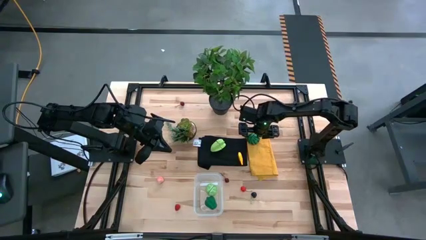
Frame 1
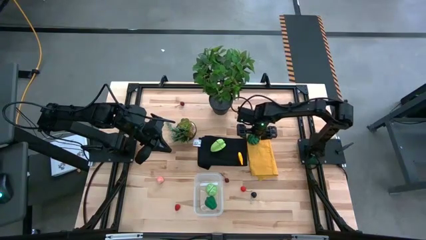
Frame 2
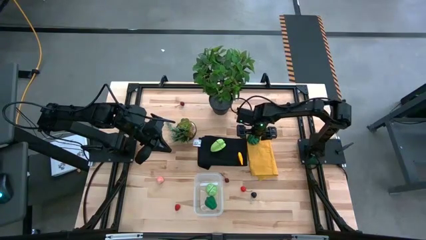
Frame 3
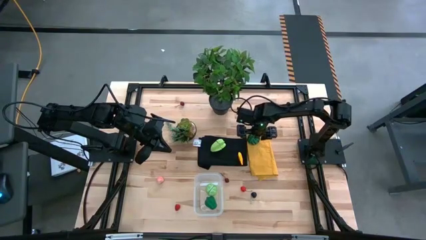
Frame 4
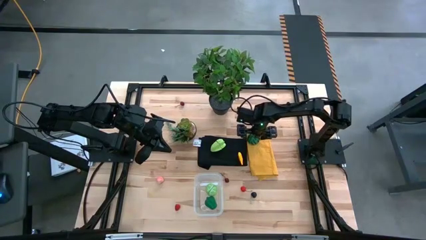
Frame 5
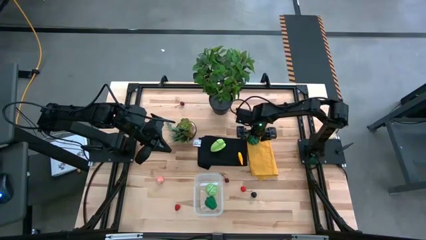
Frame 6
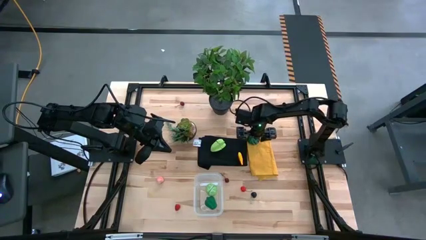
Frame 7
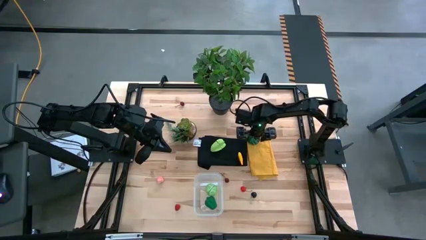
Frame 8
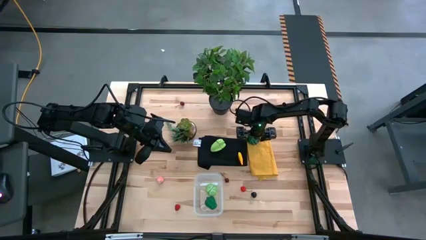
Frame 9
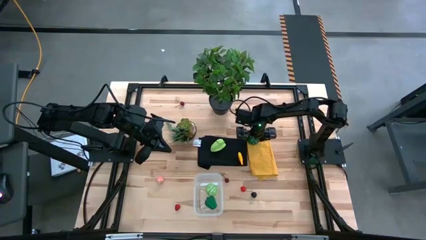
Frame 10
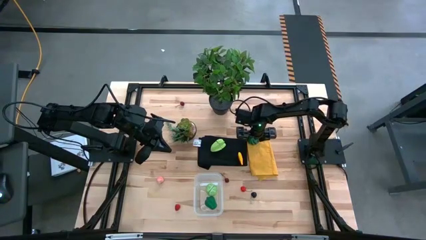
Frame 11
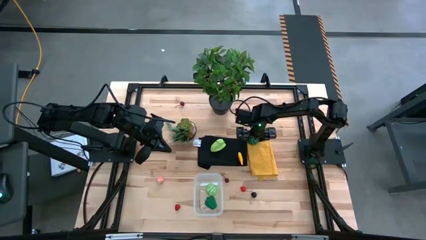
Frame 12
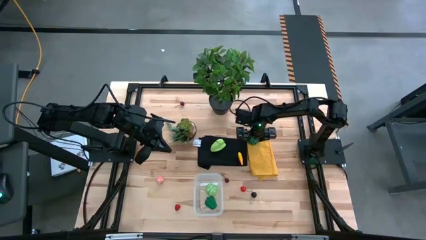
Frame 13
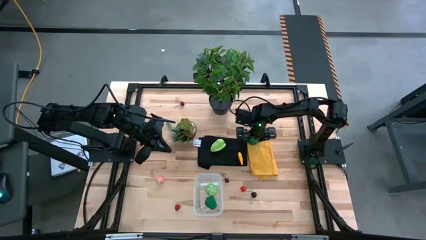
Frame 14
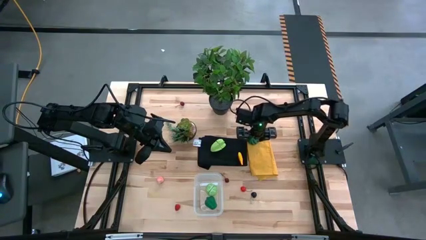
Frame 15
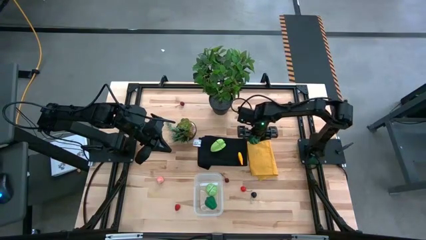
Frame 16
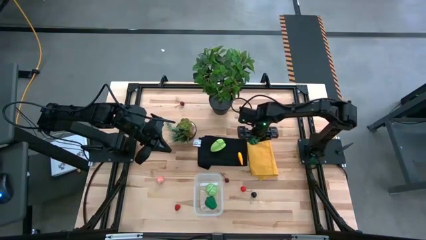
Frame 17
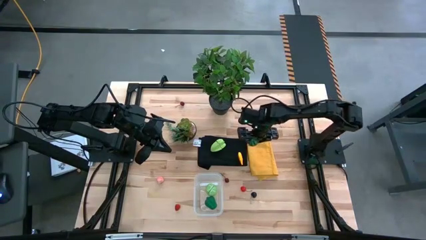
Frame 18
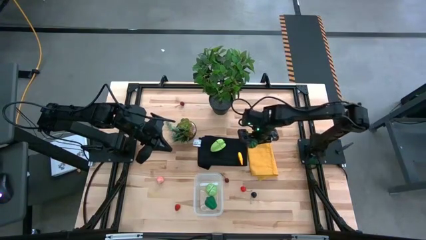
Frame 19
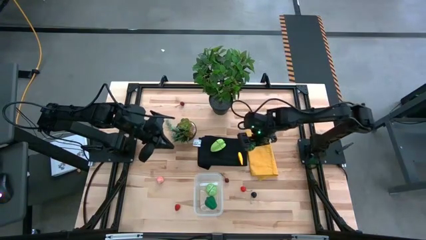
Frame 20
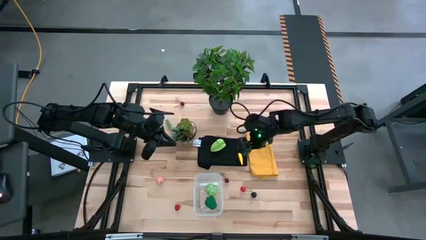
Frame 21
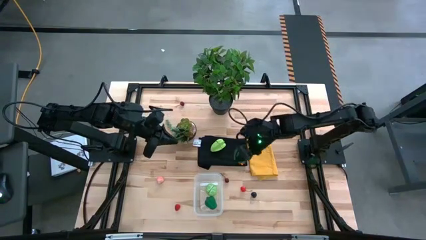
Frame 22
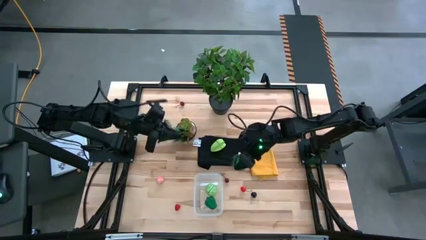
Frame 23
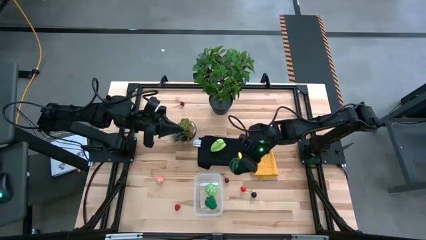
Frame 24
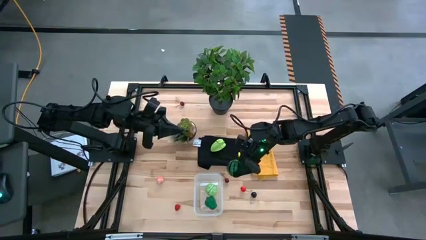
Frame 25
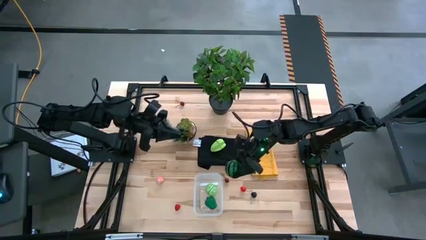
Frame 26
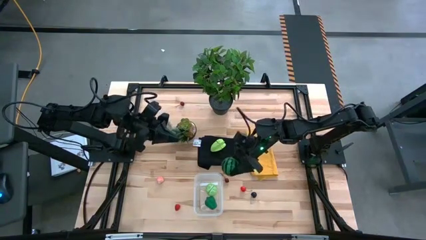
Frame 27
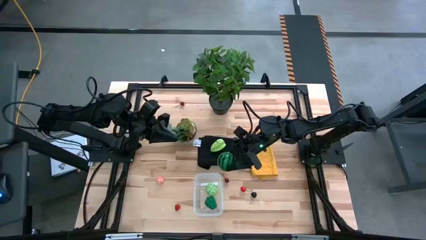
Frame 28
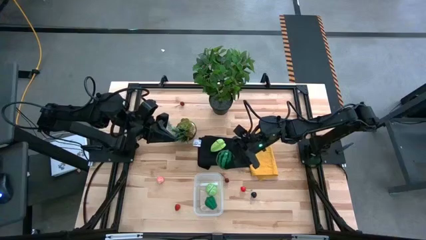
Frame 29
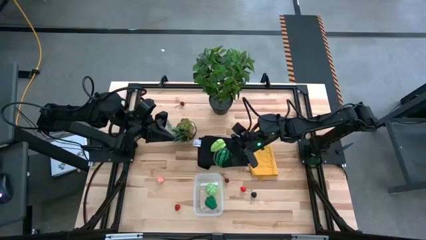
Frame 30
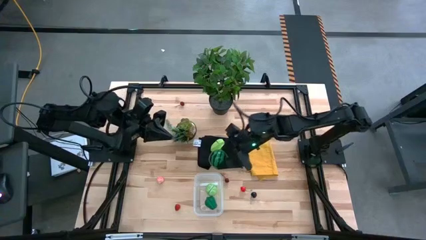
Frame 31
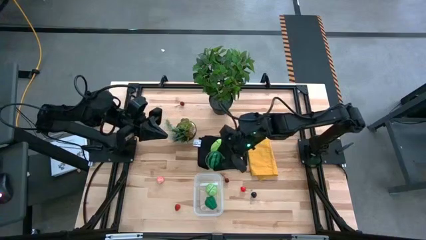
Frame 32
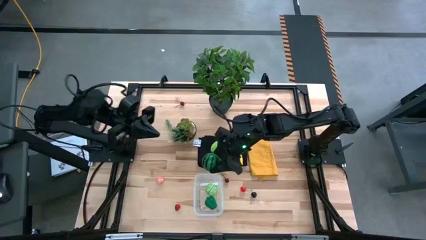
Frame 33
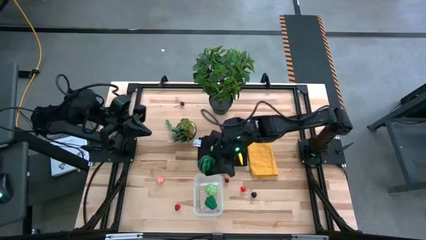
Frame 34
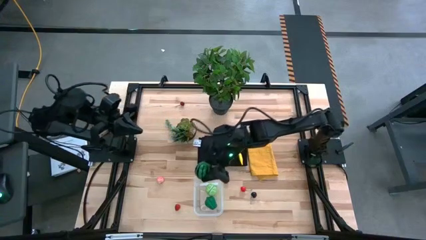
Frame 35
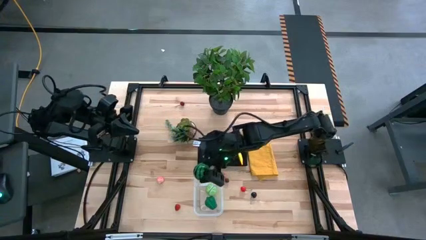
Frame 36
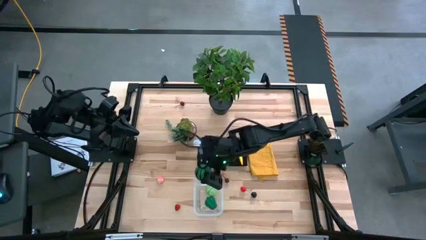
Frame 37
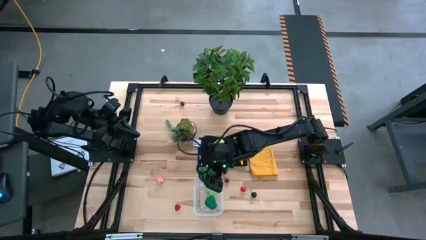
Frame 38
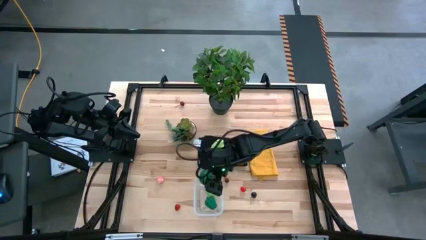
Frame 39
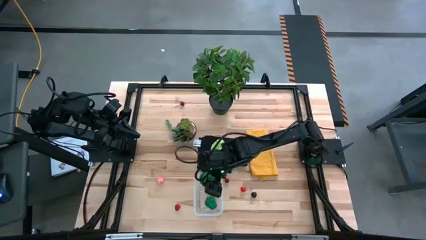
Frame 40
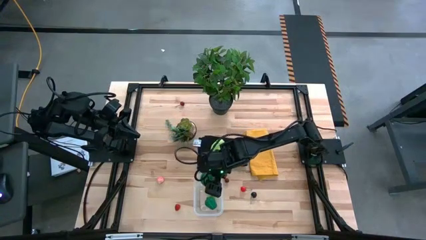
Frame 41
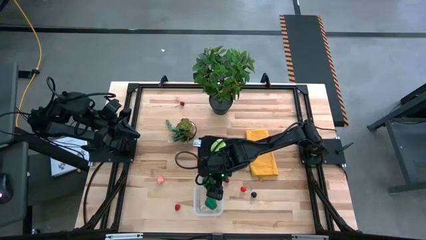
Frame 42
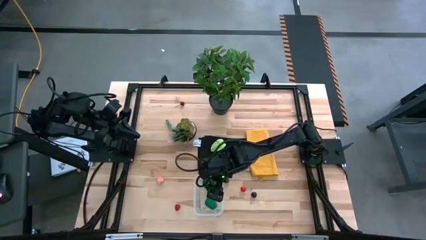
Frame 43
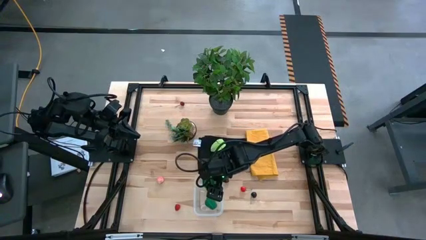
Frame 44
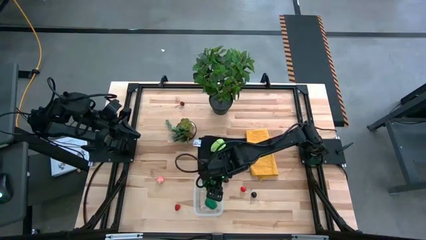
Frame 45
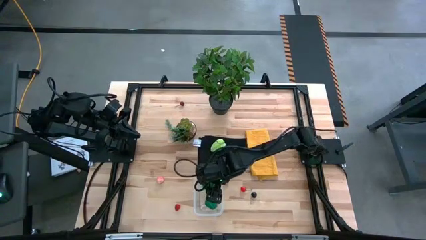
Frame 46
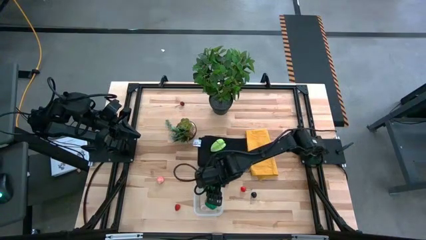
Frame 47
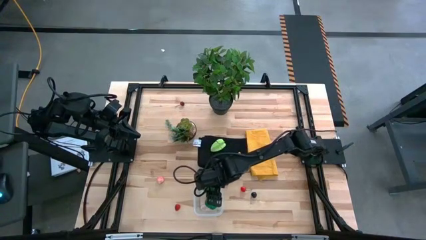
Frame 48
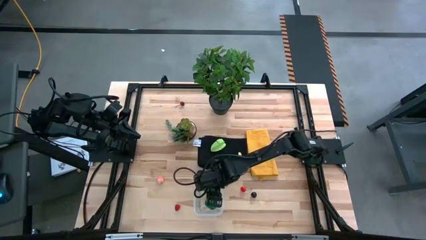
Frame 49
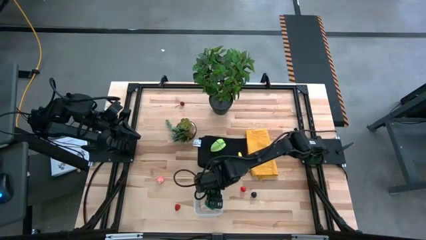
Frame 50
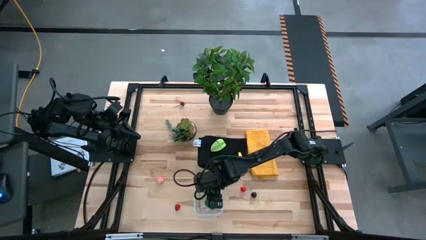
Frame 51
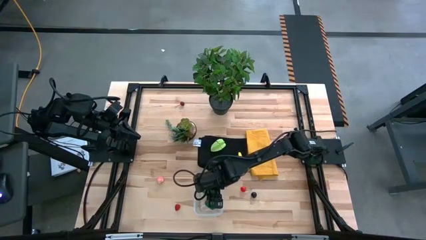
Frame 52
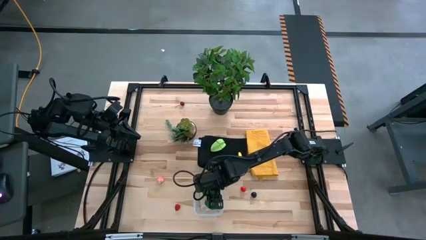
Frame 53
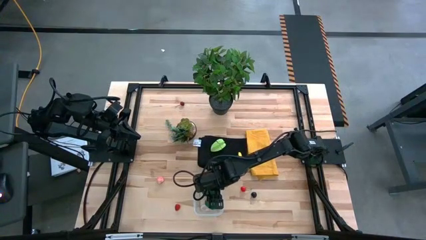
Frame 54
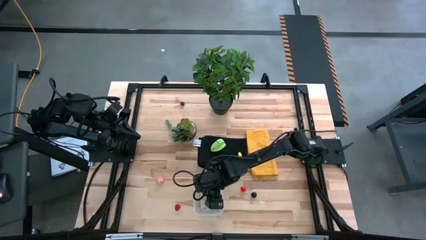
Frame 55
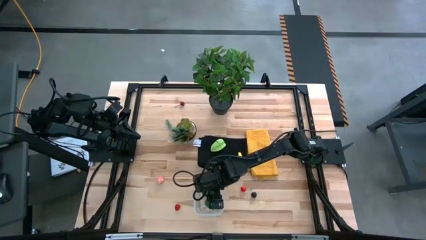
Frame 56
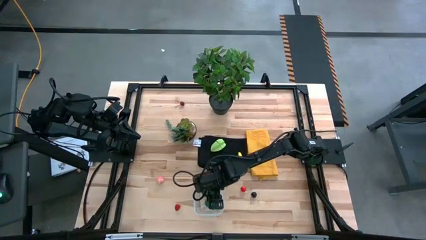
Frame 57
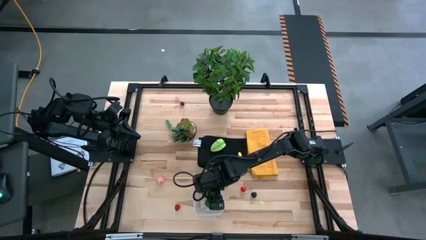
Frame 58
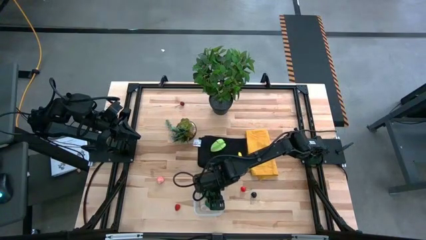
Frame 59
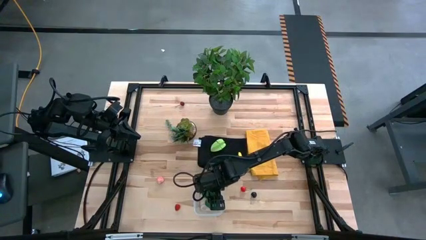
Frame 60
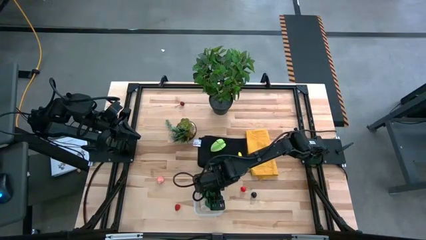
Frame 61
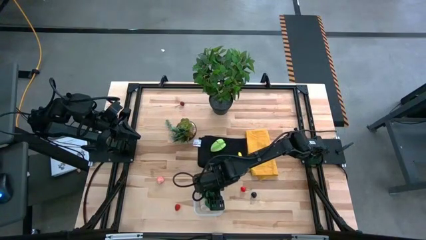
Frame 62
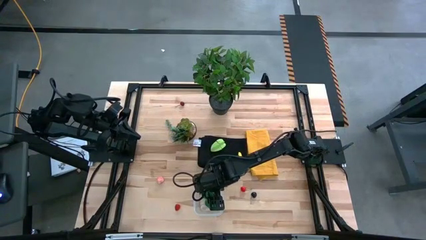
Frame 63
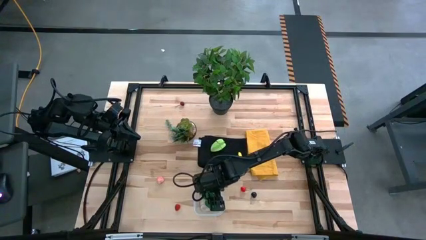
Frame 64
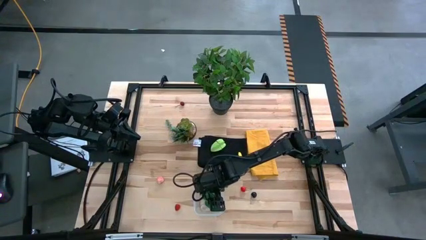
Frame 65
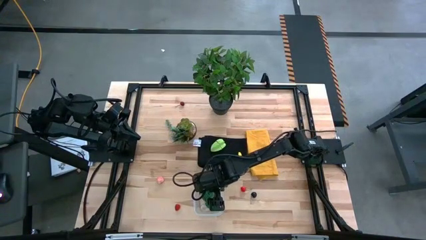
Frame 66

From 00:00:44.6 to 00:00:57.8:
Task: Pick and placing Produce into tupperware
Put the watermelon into the bin
